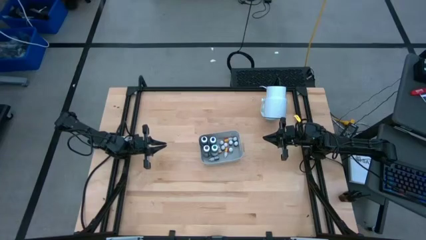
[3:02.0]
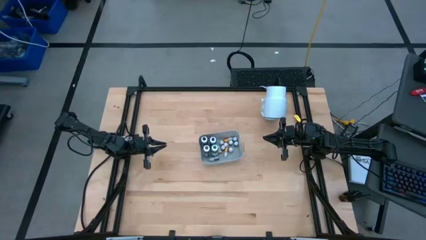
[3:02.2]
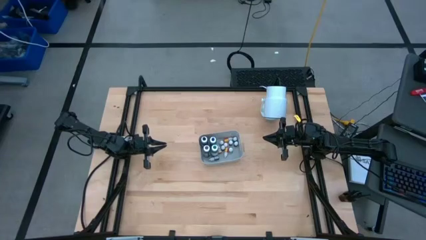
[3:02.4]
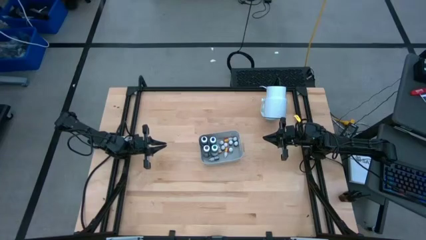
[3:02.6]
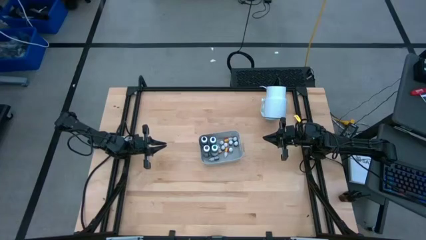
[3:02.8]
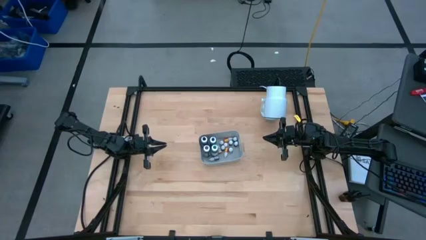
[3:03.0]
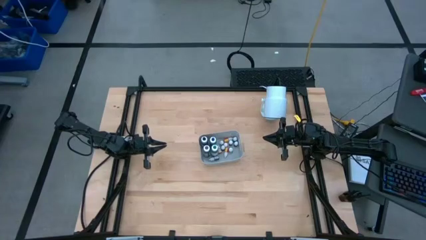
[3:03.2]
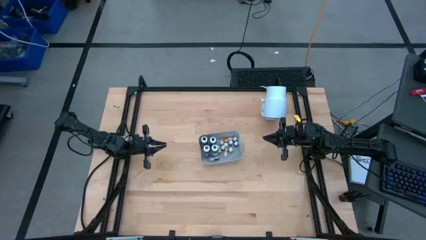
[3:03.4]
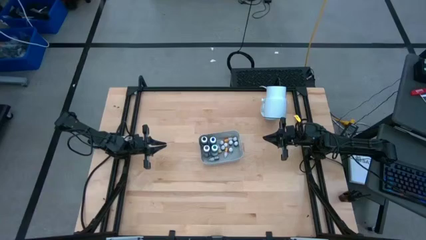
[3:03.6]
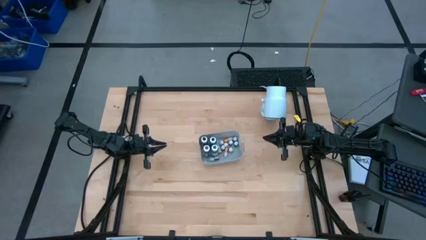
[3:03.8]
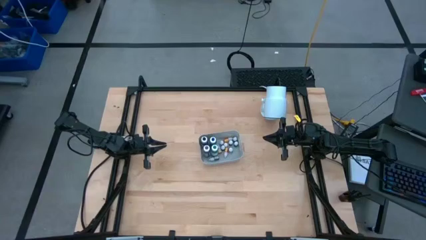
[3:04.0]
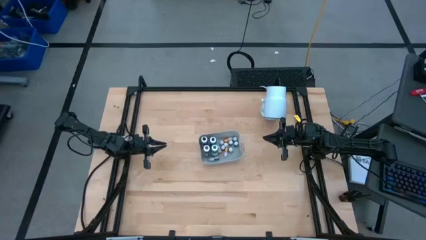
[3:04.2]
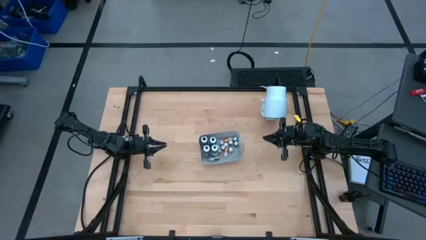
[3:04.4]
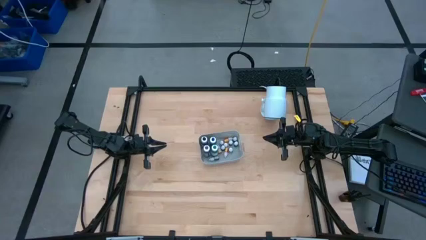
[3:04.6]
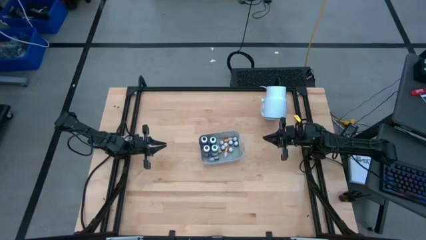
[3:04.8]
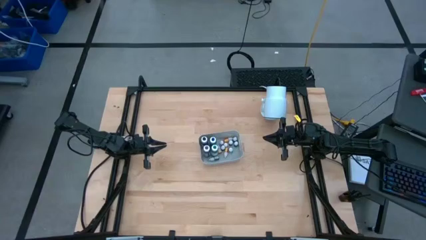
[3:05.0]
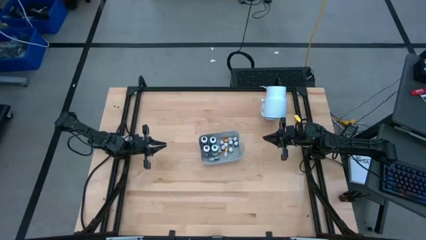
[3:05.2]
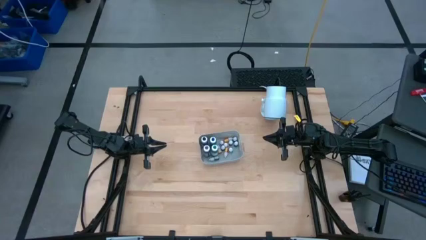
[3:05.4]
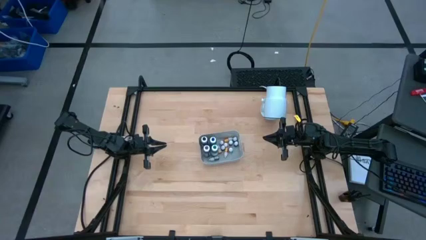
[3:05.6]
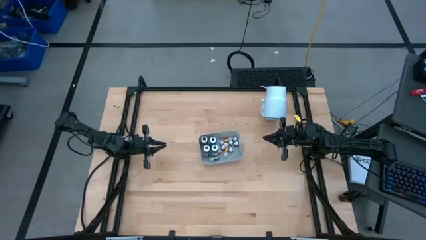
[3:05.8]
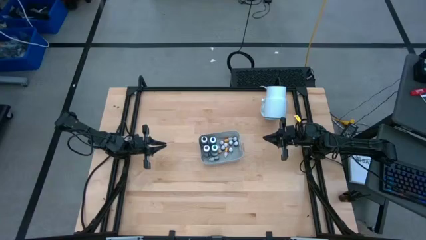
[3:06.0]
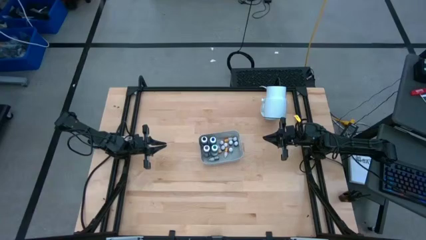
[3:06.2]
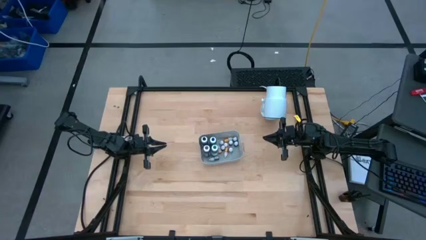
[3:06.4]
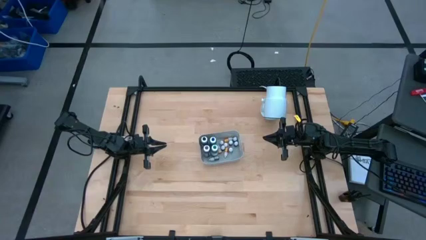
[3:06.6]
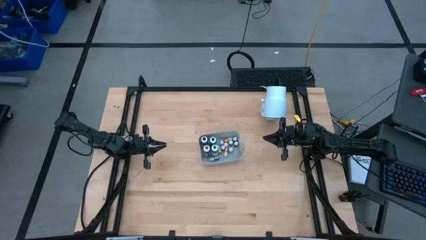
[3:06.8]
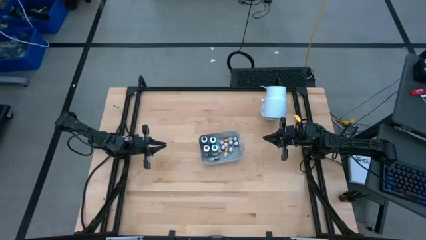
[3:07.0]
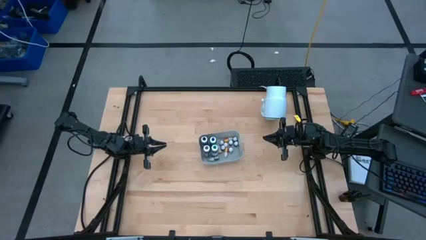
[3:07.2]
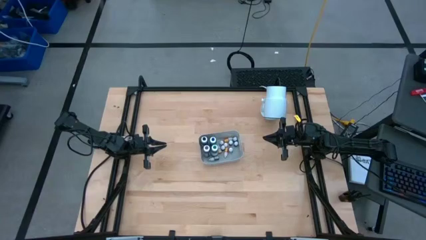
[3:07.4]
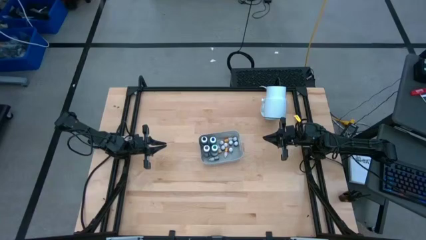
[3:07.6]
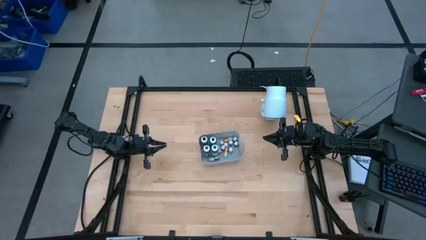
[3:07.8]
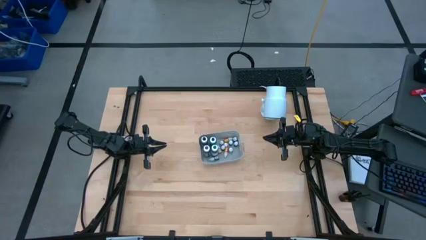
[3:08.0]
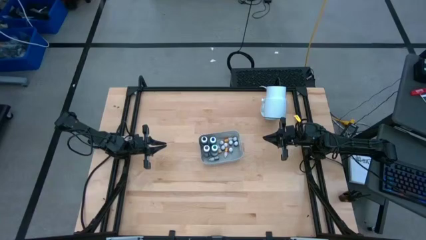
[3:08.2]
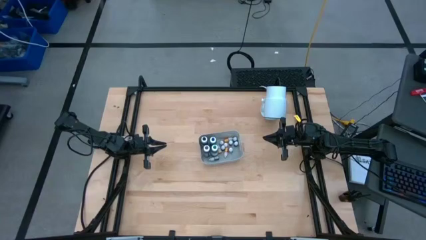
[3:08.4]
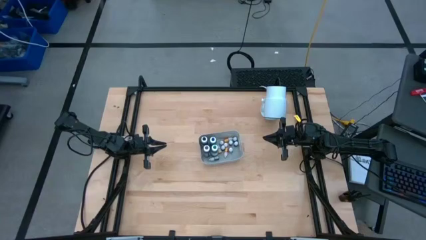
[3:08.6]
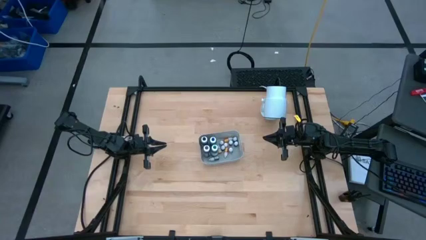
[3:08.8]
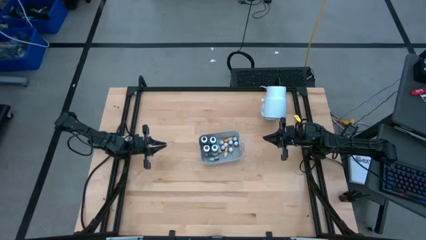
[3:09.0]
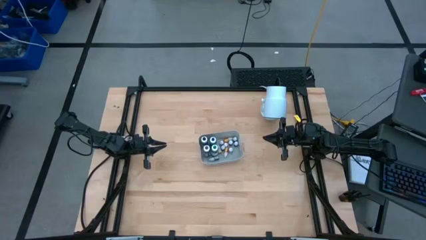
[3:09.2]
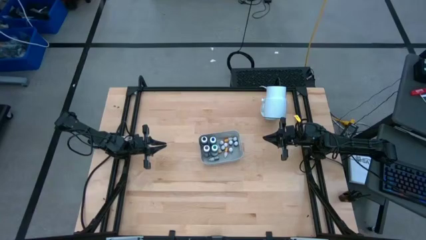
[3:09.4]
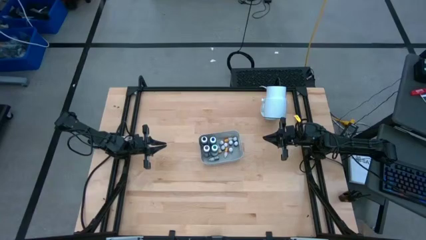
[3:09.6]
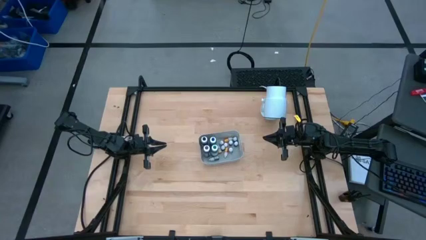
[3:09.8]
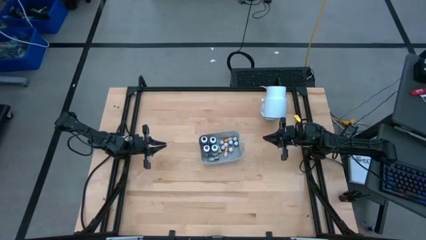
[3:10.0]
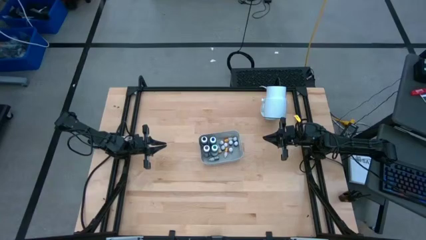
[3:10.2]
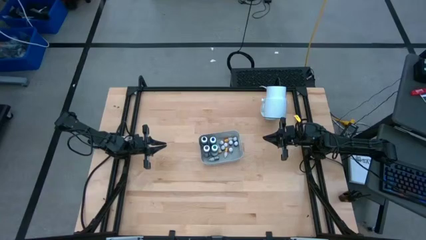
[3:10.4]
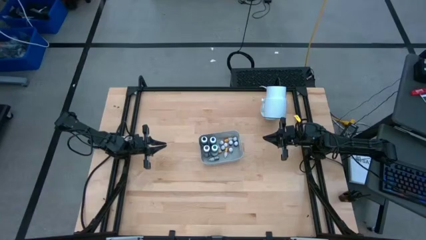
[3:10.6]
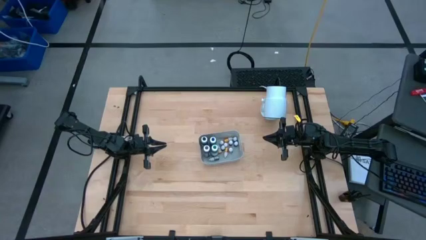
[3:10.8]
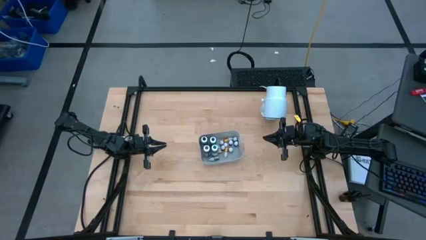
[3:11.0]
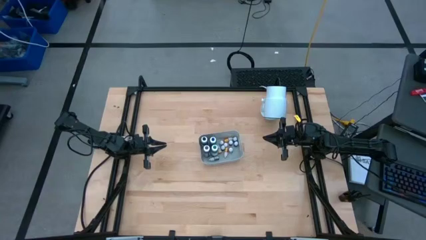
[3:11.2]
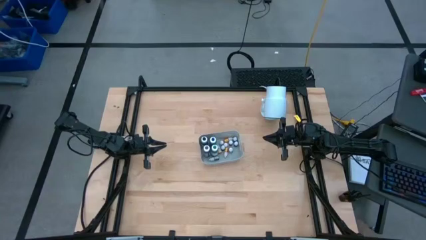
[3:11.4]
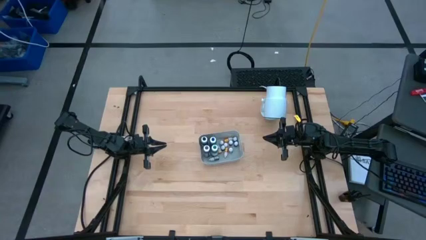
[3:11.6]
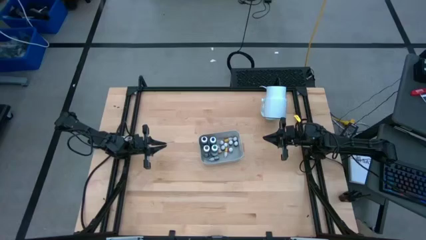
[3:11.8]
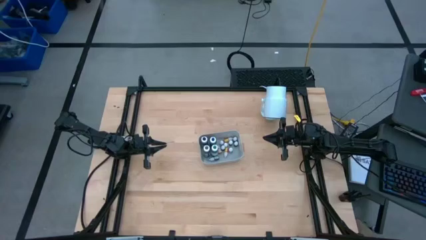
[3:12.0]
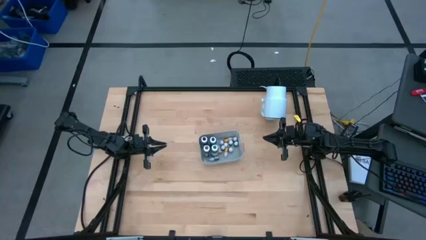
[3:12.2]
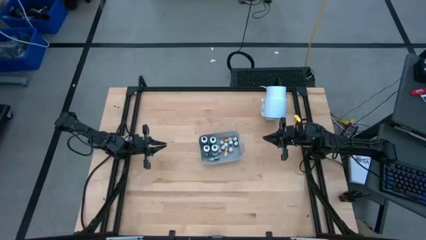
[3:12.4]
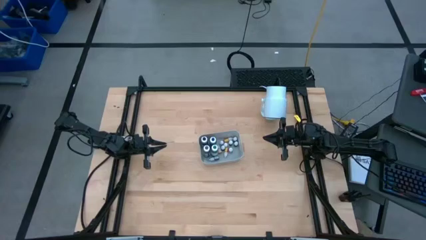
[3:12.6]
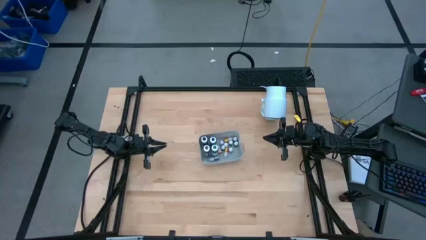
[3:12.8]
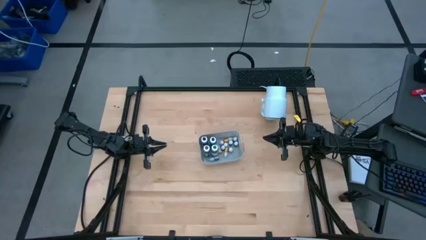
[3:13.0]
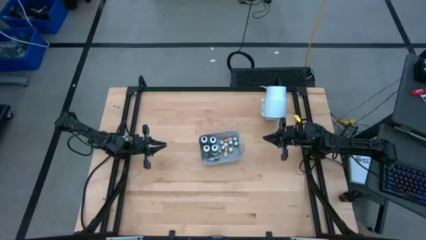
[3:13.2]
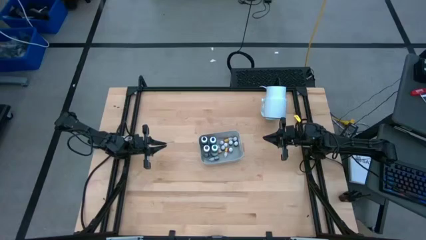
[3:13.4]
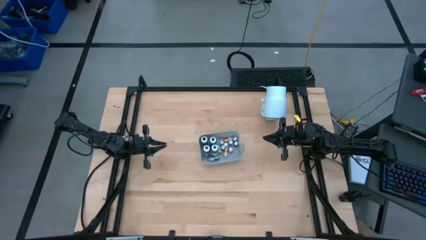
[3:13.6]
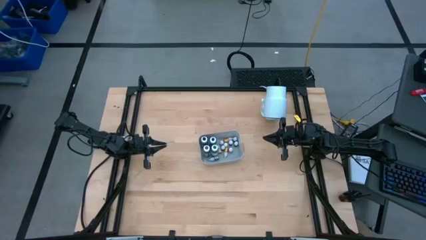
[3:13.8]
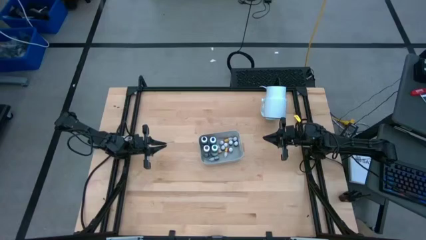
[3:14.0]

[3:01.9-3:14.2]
Task: Pick & Place food coloring
Return to Home Position

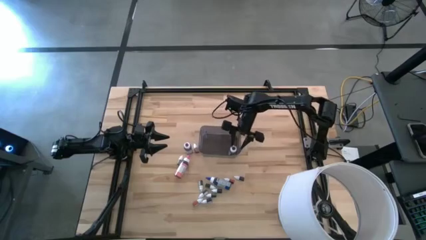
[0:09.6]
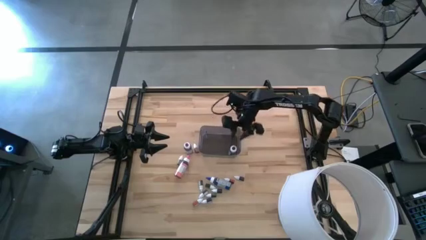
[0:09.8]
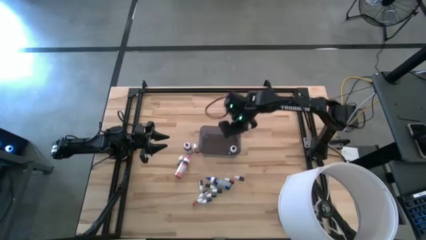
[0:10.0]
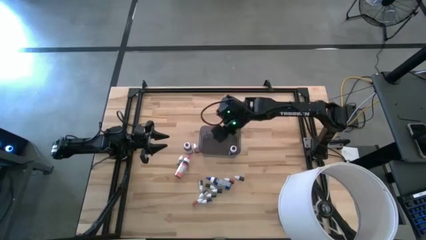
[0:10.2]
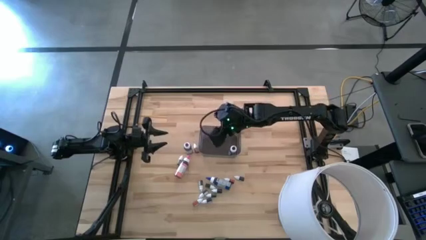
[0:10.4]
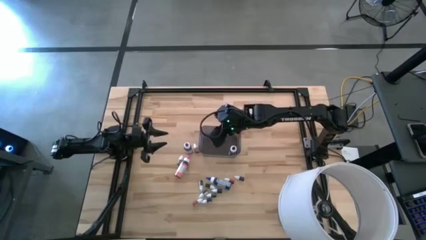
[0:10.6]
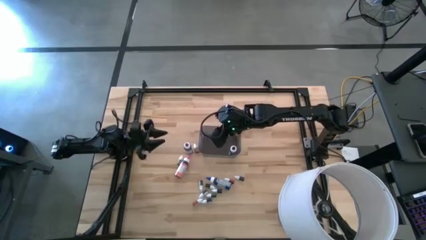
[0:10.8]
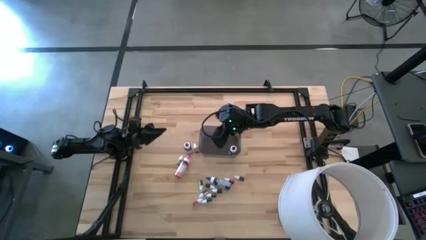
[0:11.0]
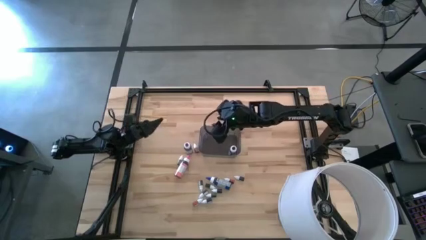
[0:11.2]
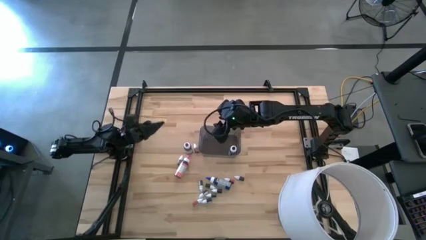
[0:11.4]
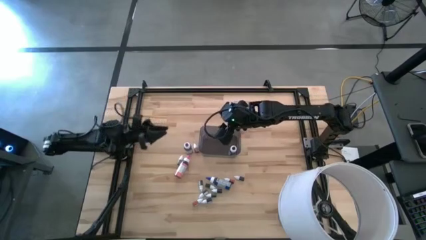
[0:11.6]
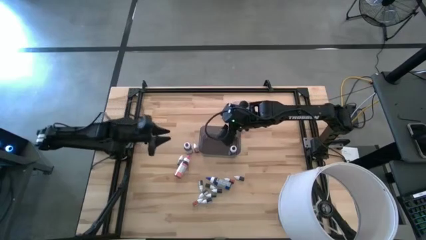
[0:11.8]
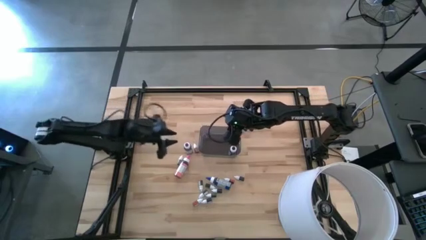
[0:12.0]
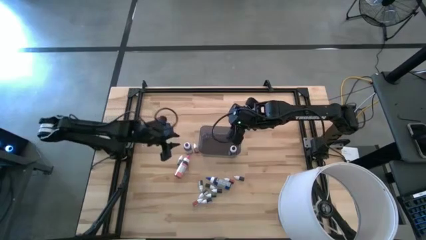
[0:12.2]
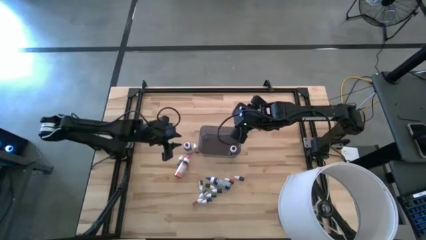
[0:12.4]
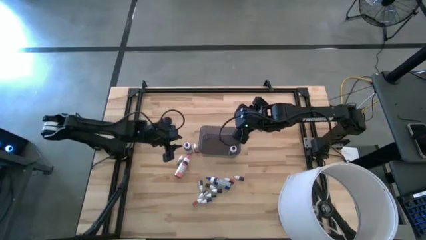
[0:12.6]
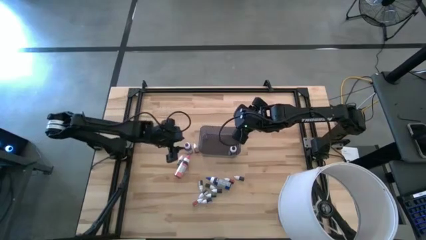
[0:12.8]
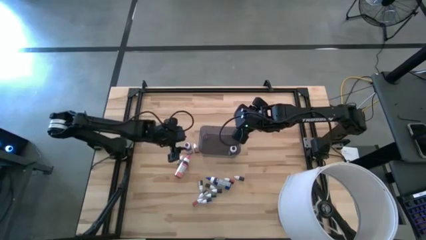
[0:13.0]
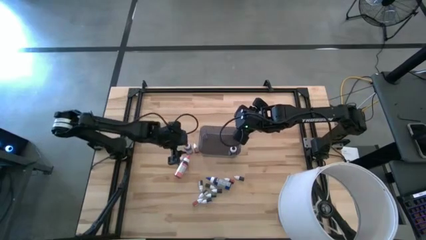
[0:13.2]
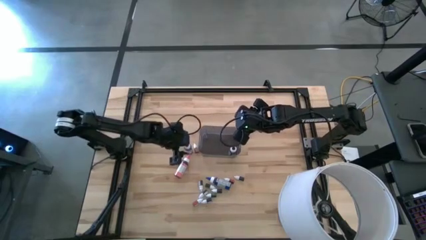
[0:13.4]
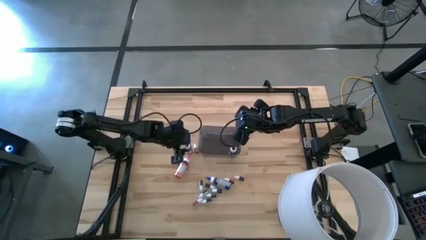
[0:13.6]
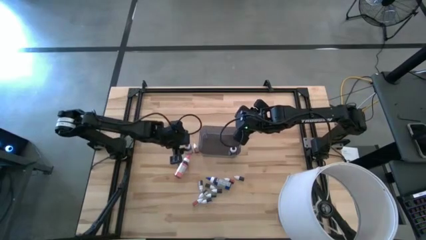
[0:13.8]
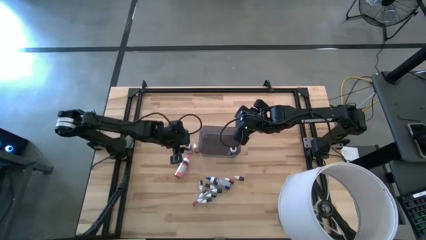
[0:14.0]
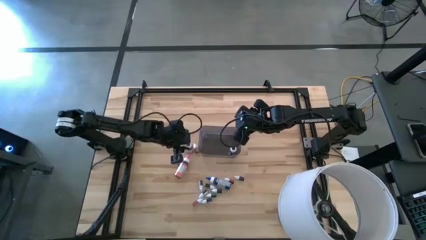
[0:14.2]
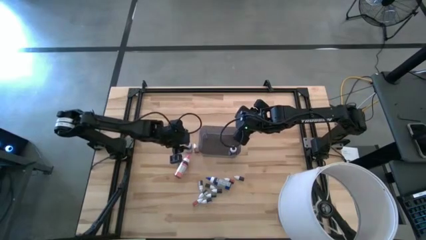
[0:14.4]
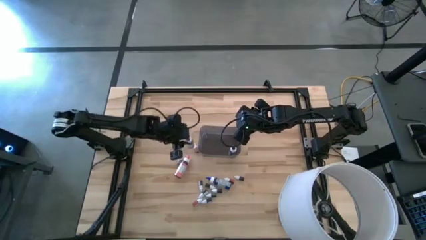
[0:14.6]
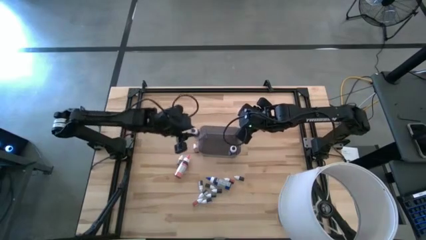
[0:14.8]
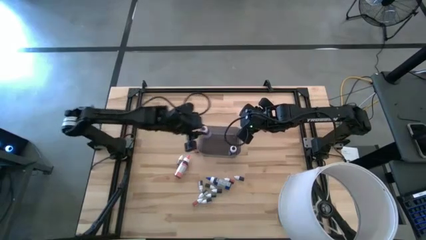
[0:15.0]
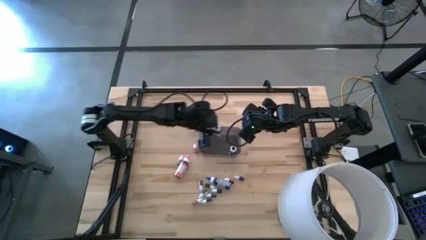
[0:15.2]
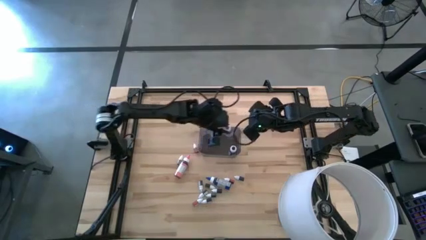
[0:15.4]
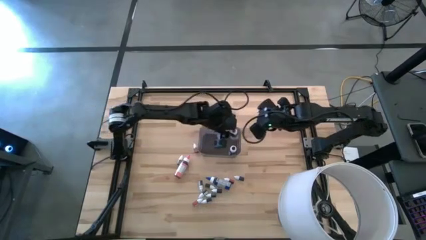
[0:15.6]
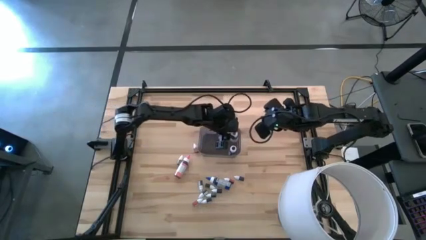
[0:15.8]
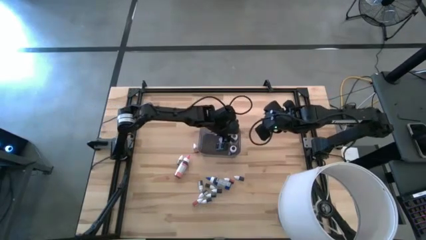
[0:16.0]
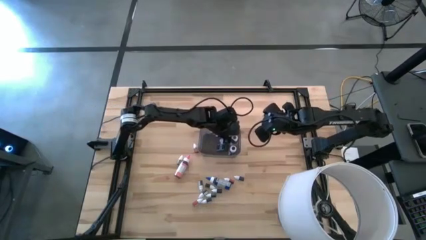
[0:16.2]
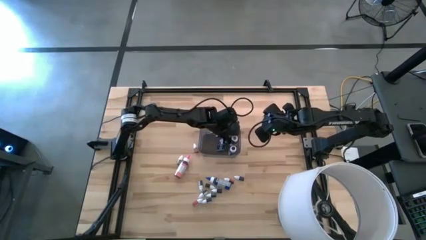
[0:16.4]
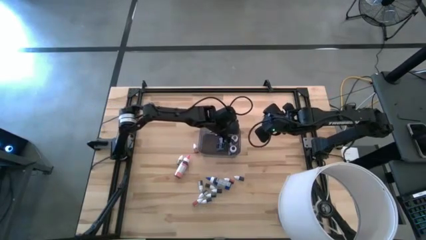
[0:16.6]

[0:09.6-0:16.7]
Task: Pick & Place food coloring
Put the large violet food coloring bottle in the black bin
